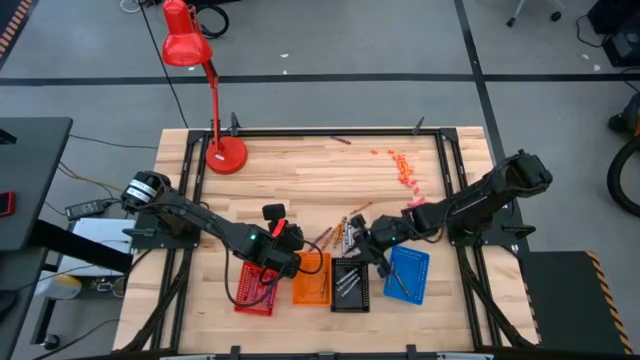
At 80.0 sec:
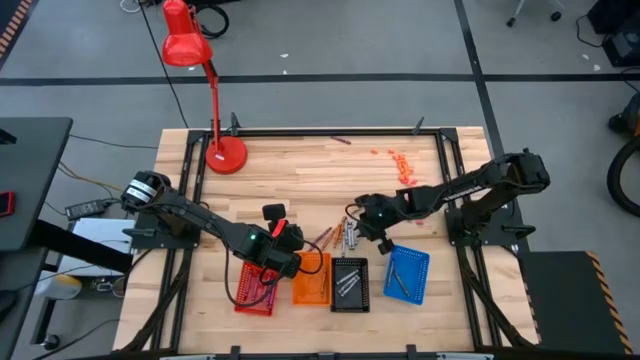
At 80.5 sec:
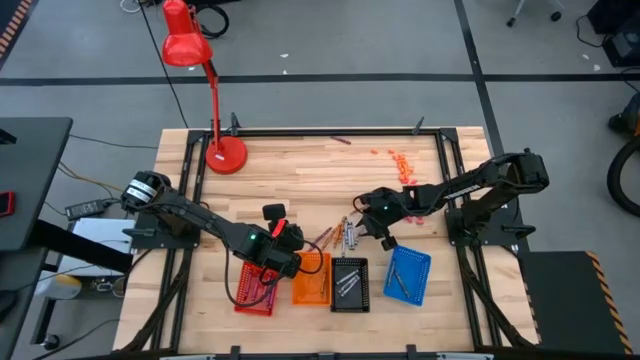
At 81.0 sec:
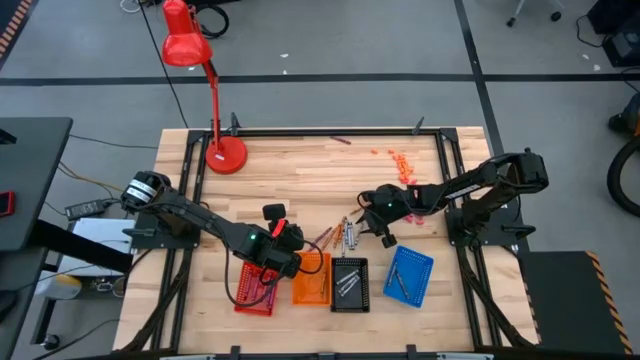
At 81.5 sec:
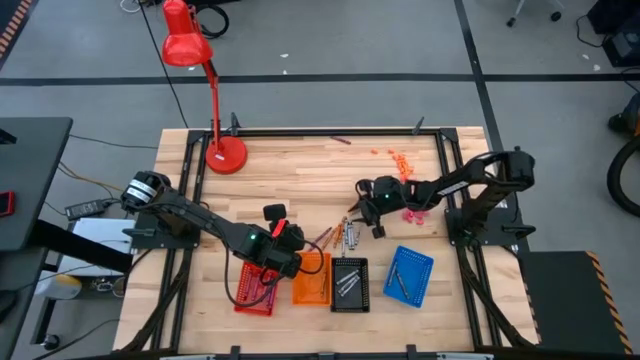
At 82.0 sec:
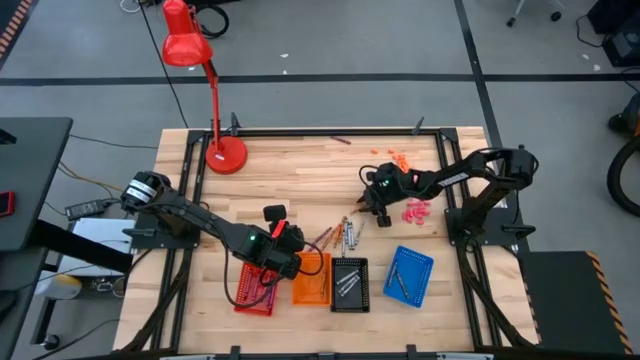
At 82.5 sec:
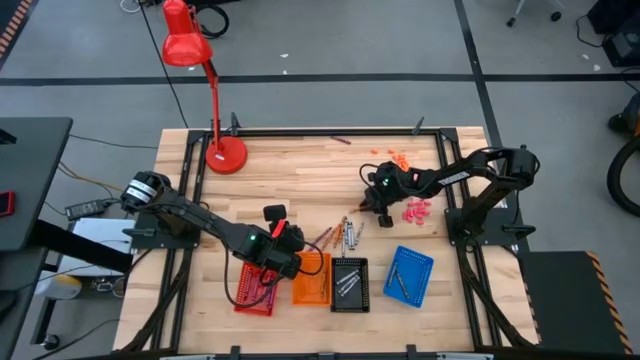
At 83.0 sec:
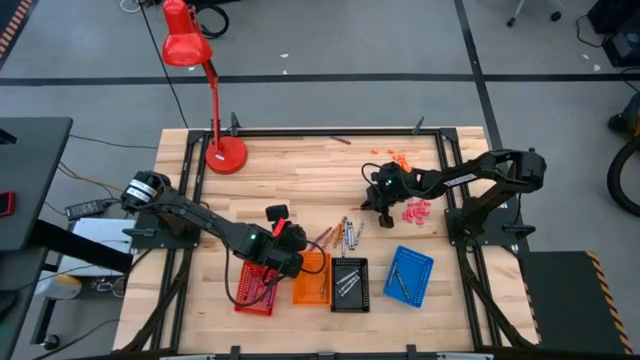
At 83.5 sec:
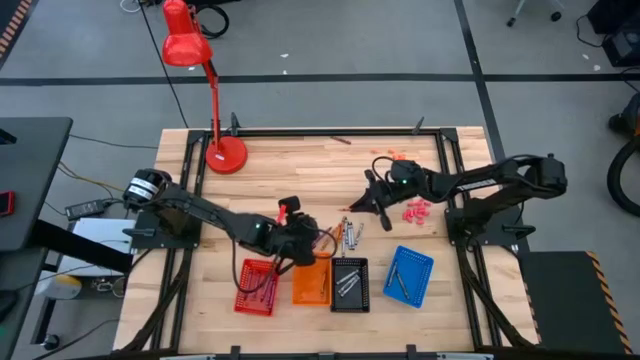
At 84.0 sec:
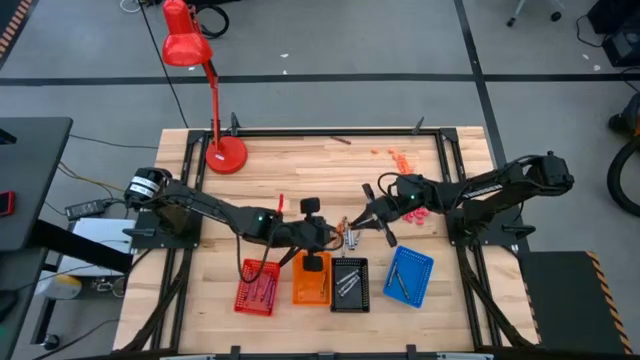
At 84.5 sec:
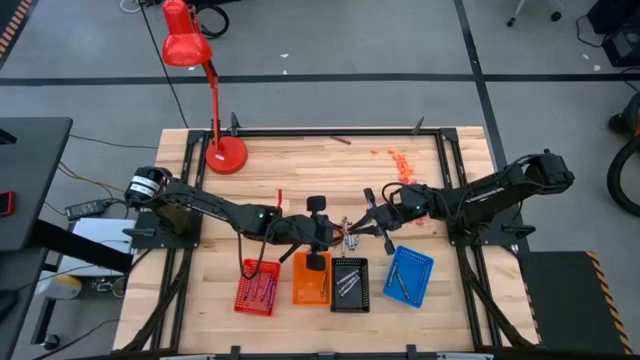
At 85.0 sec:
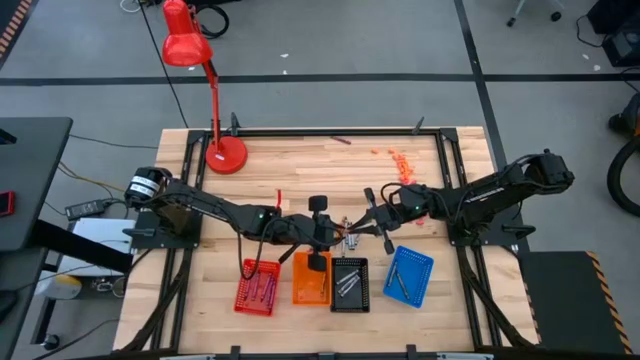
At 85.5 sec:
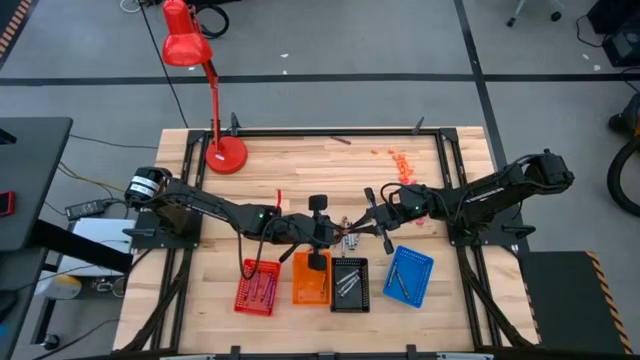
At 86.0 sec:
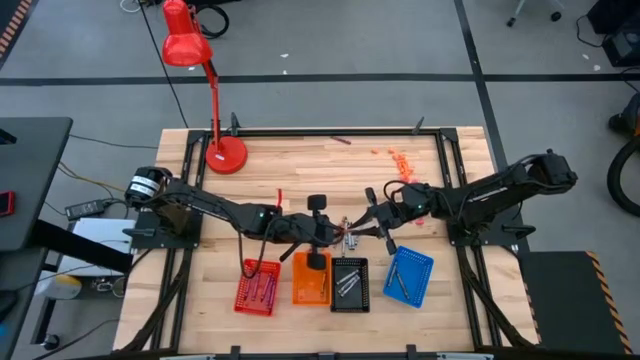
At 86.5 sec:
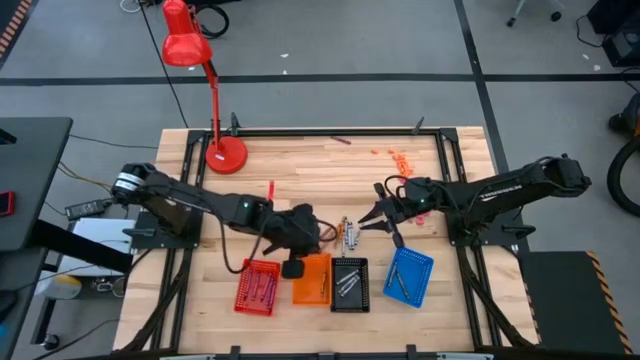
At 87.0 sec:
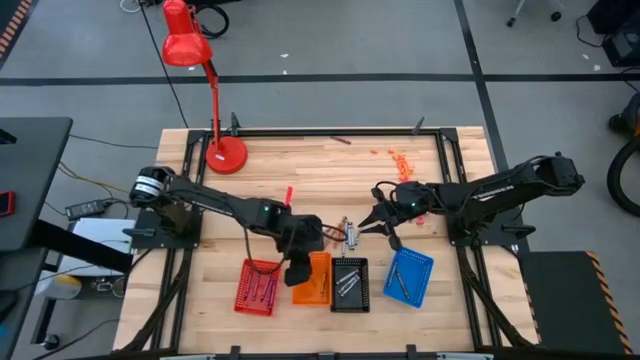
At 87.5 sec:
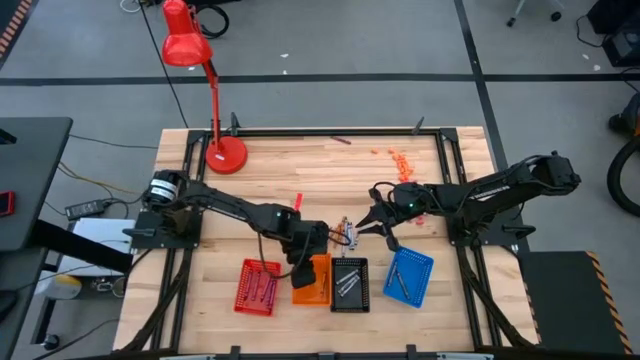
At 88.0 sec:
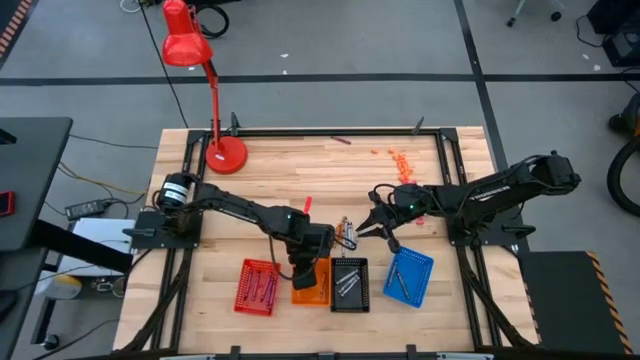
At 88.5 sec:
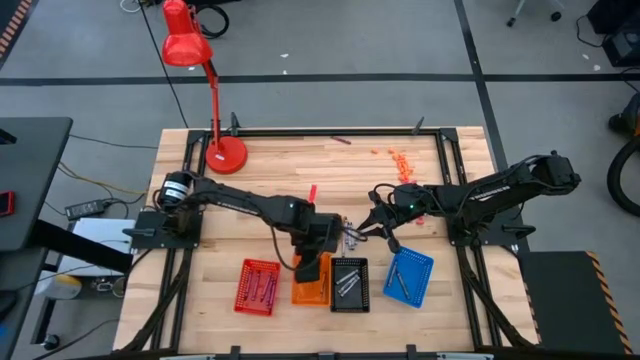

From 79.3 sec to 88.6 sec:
Task: Sort crayons
Put the orange crayon into the orange bin

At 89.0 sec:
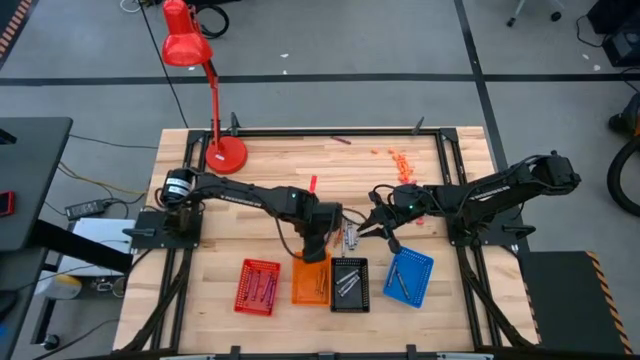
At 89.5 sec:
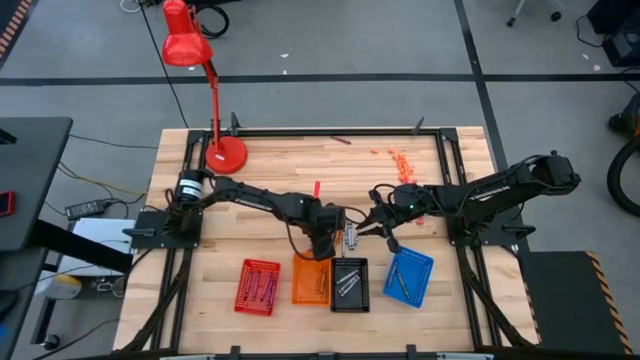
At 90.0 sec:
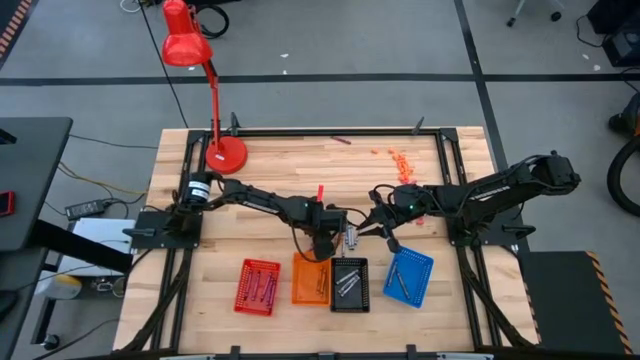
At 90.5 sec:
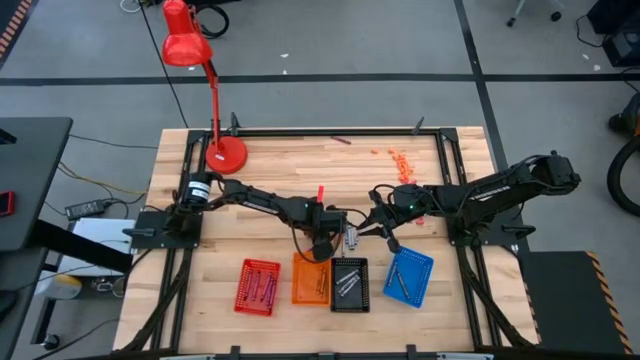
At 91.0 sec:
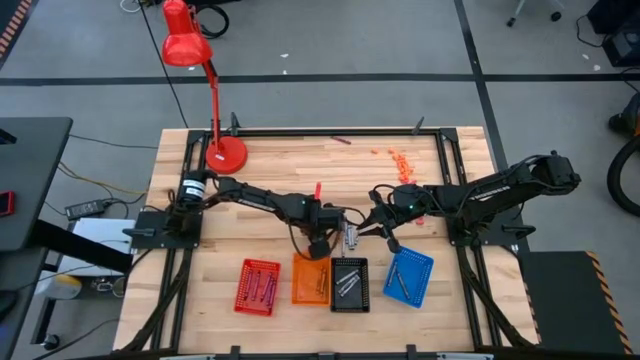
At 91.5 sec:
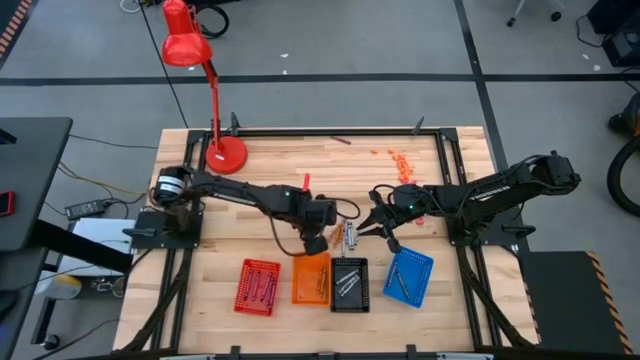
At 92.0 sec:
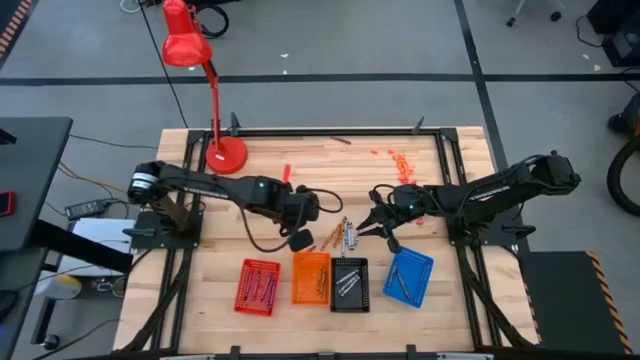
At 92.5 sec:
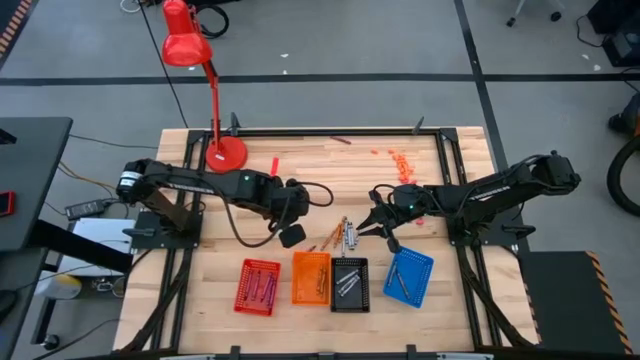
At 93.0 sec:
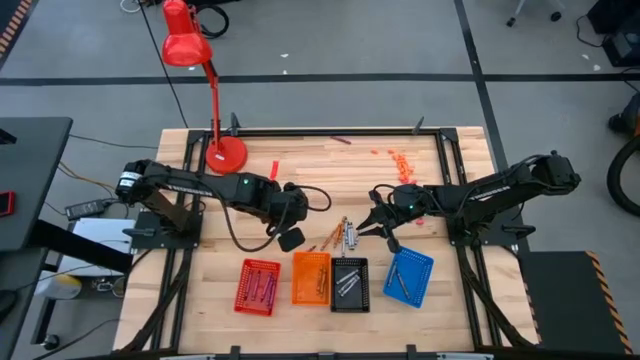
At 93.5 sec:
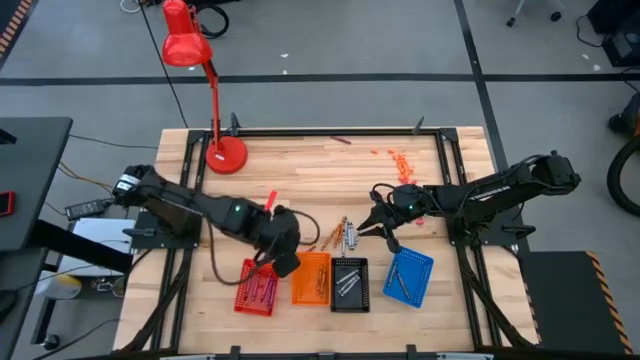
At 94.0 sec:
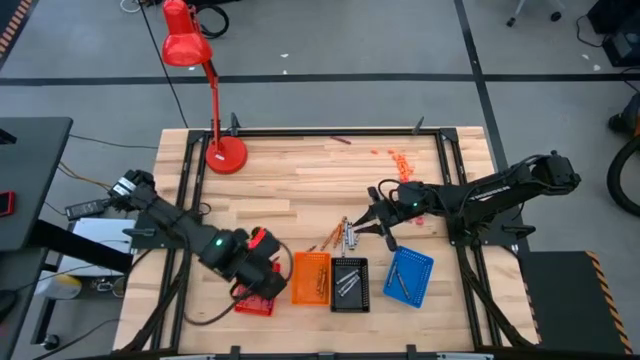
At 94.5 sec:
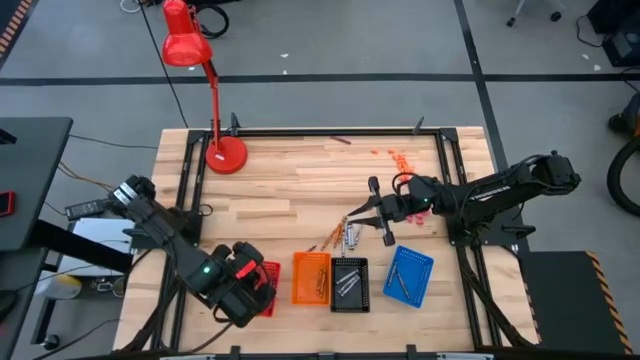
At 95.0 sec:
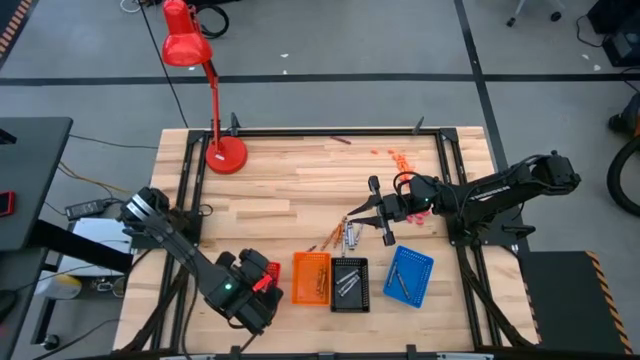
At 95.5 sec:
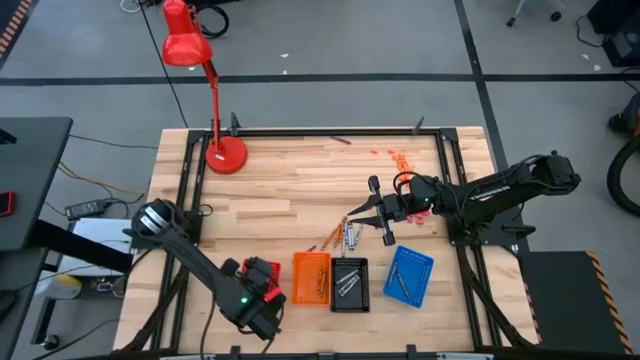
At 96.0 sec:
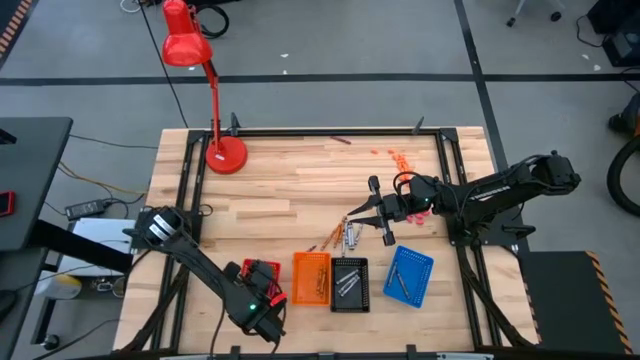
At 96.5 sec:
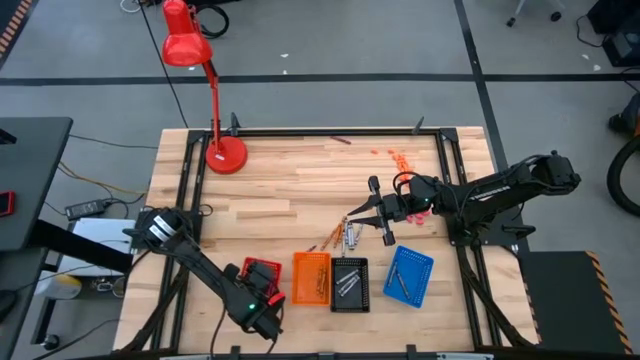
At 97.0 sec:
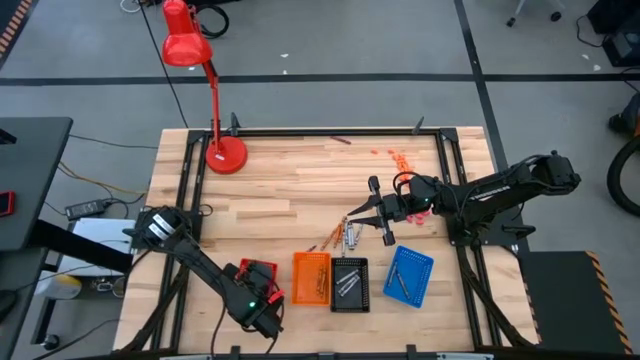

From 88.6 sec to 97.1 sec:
Put the violet crayon into the red bin

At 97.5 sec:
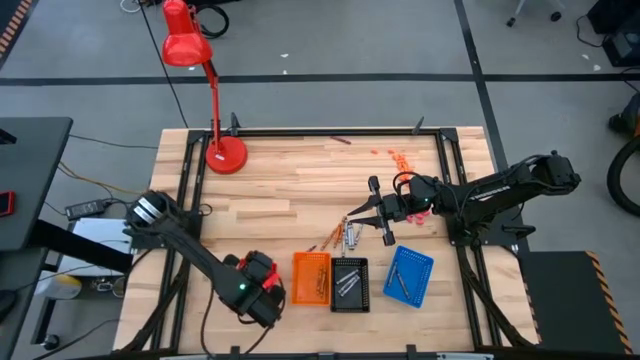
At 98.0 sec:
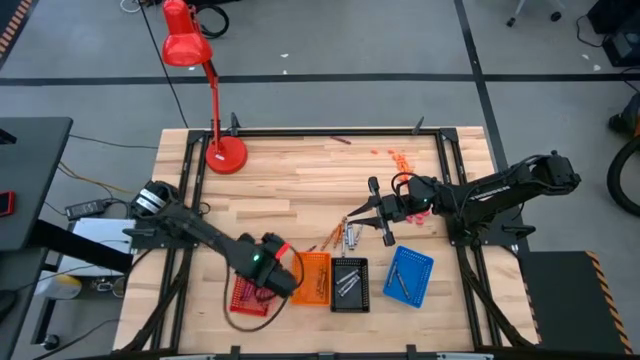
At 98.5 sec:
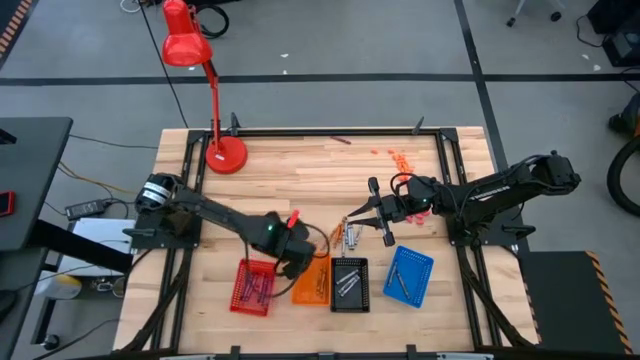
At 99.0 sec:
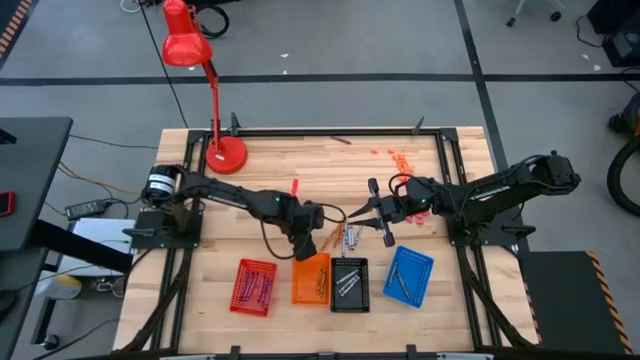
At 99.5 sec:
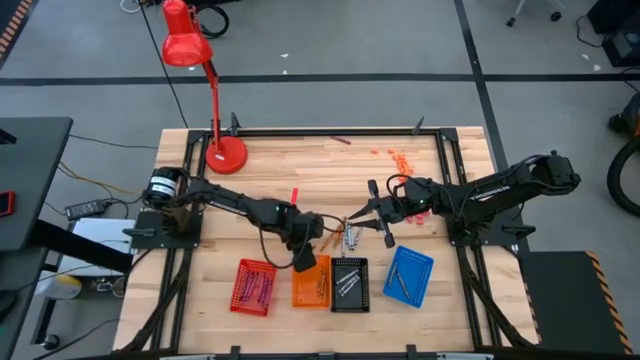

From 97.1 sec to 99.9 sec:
Adjust the orange bin
